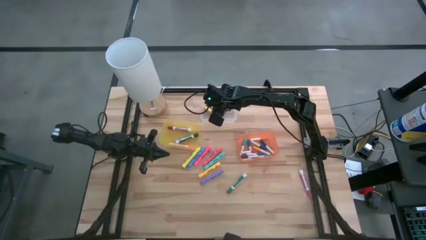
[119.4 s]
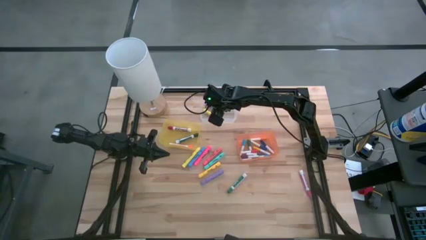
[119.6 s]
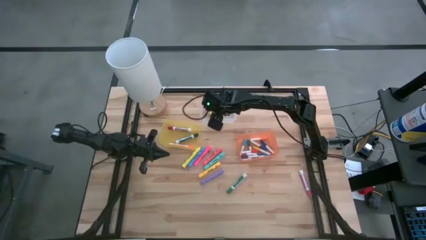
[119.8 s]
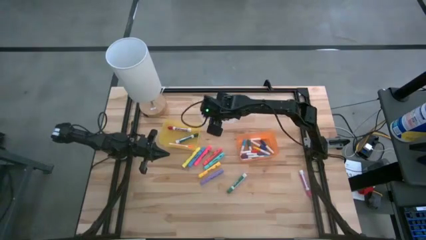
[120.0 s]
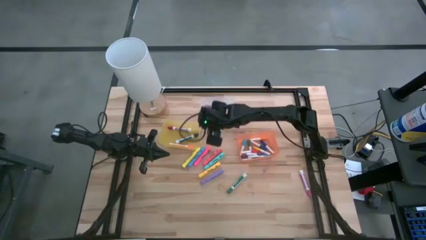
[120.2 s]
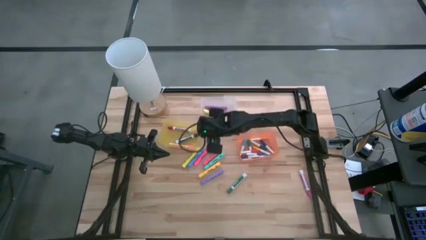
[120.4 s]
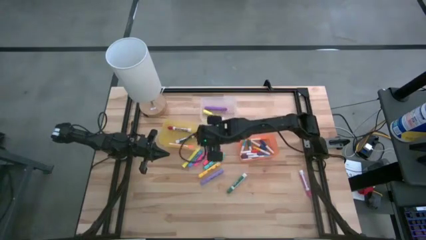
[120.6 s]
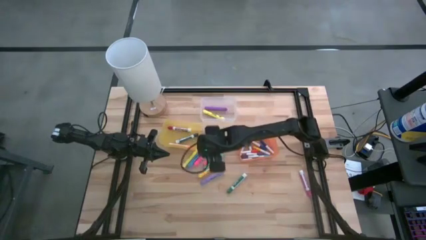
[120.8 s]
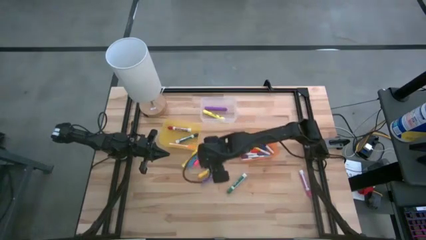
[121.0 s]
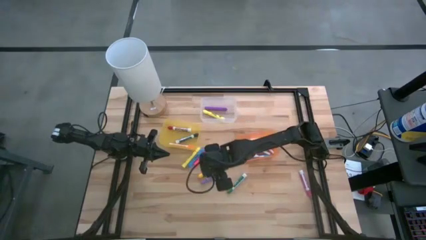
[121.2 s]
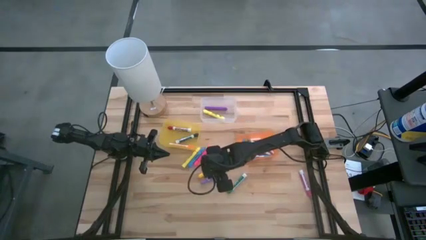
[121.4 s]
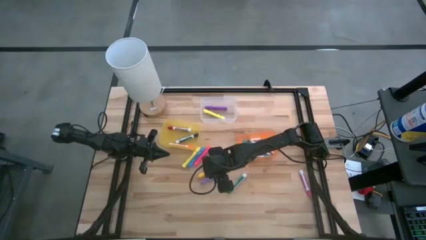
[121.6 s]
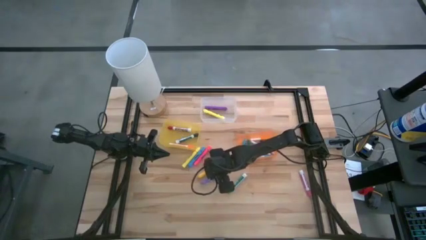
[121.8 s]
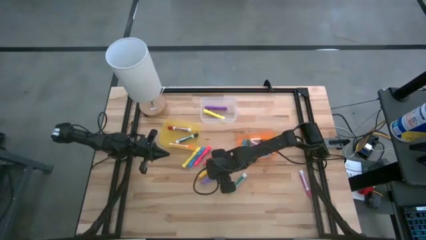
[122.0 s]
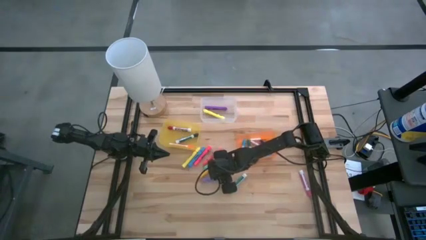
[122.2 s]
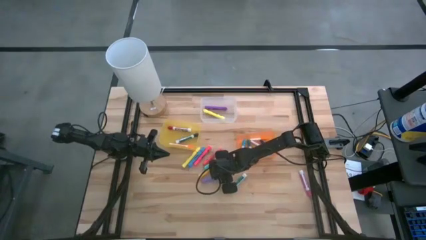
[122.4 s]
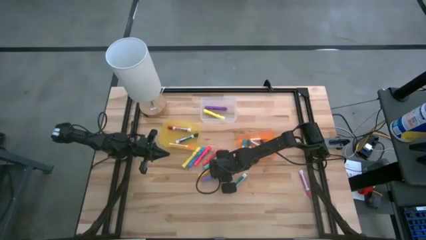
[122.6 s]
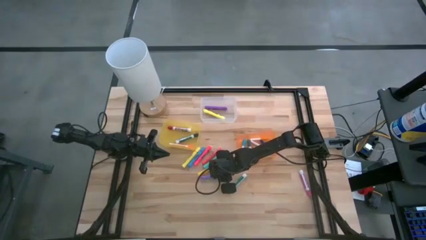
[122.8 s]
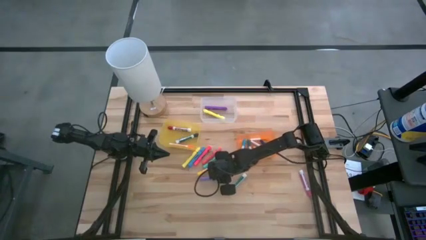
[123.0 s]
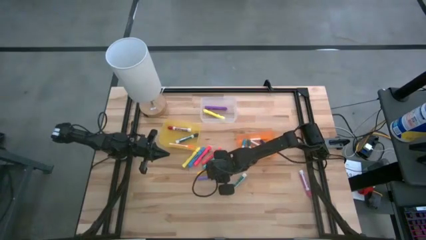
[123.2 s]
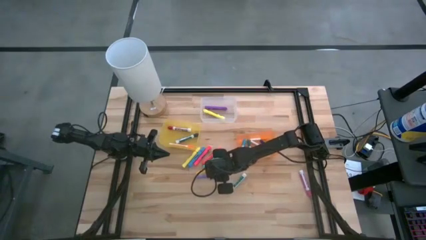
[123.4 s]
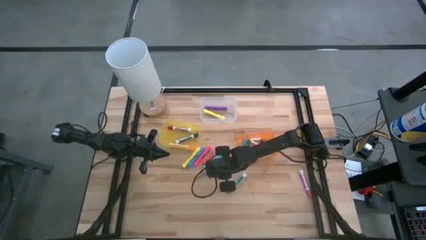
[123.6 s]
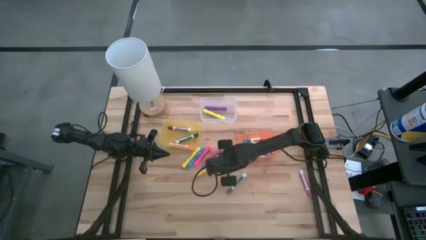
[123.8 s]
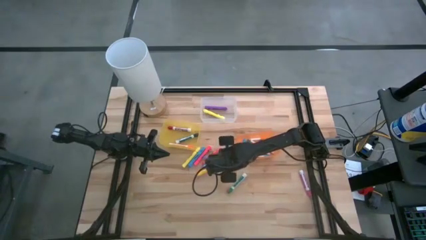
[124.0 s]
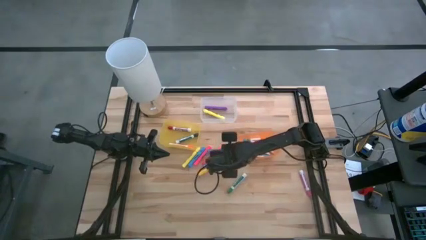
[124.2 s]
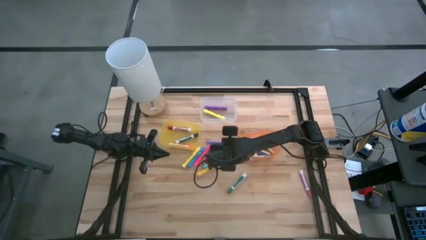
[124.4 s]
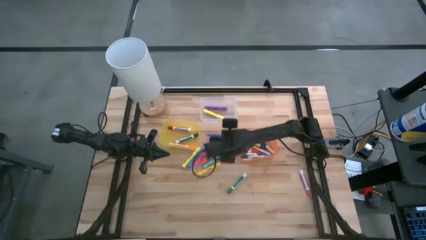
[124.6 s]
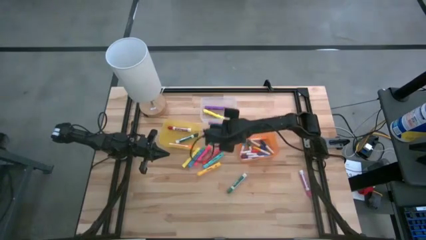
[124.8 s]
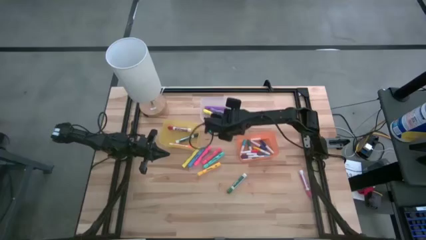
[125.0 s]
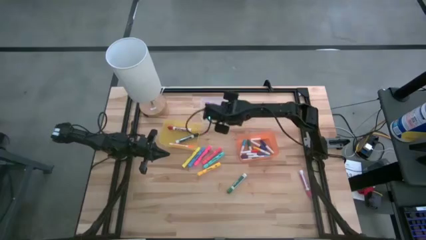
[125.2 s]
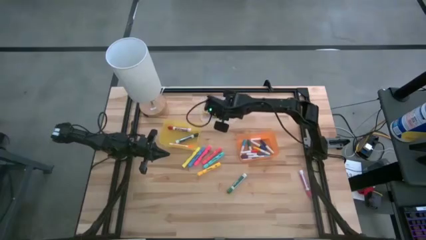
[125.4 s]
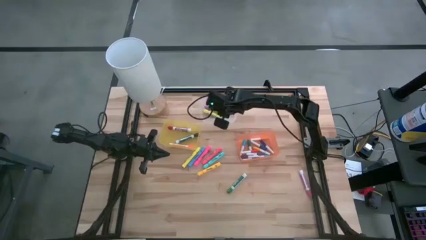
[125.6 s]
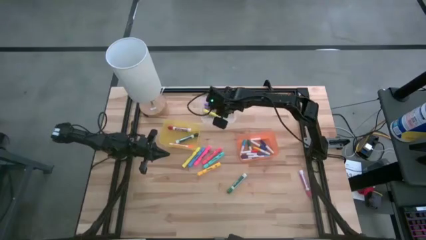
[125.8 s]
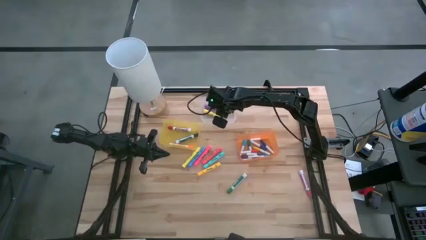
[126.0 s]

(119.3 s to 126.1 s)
Task: Pick & Place Markers
Put the large violet highlighter pen into the transparent bin

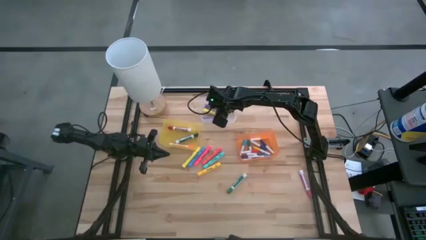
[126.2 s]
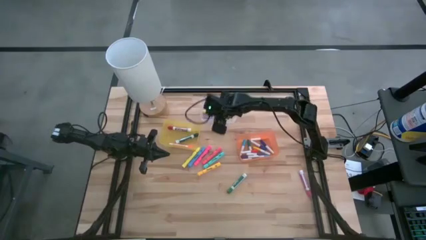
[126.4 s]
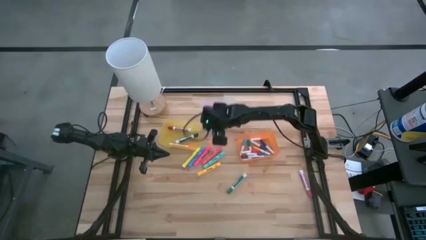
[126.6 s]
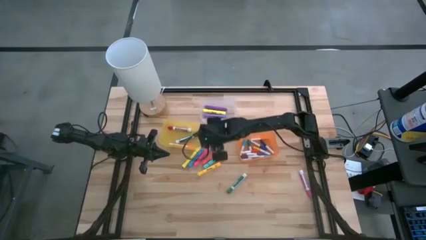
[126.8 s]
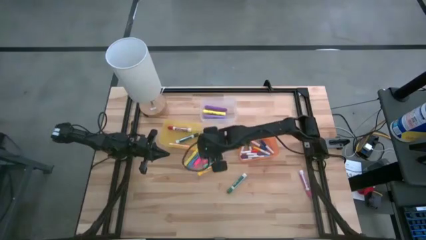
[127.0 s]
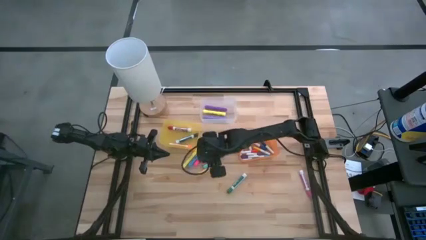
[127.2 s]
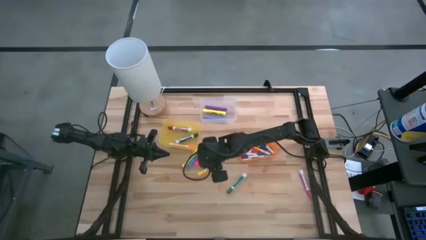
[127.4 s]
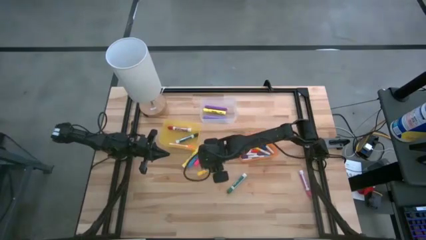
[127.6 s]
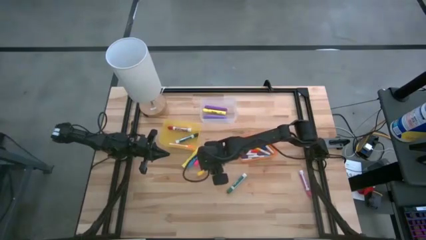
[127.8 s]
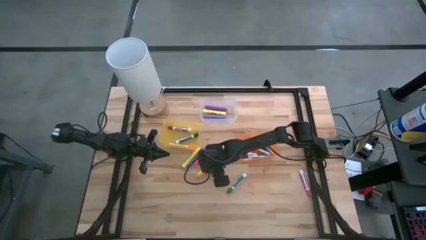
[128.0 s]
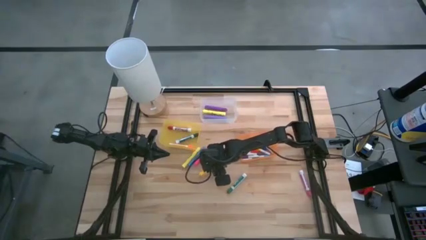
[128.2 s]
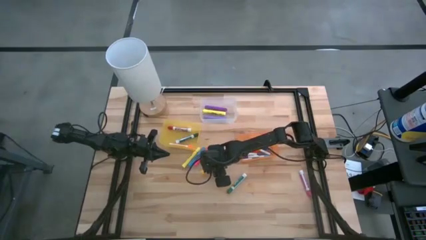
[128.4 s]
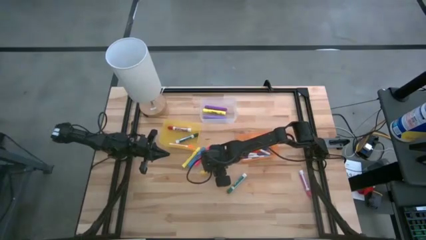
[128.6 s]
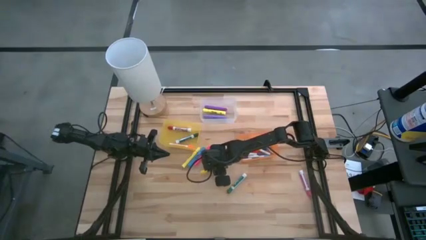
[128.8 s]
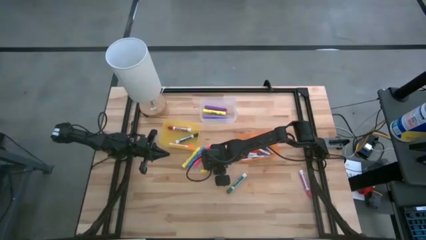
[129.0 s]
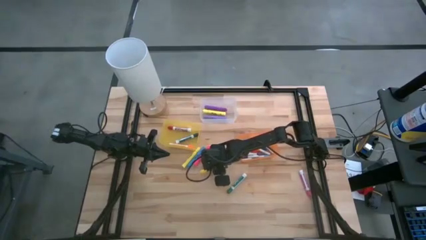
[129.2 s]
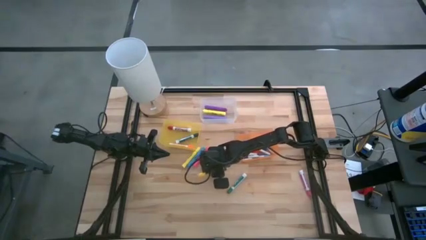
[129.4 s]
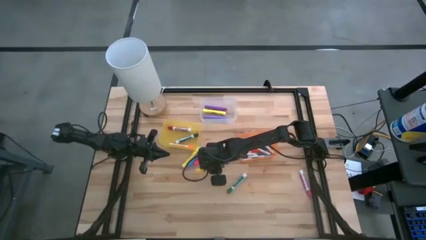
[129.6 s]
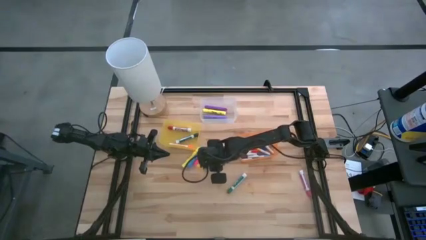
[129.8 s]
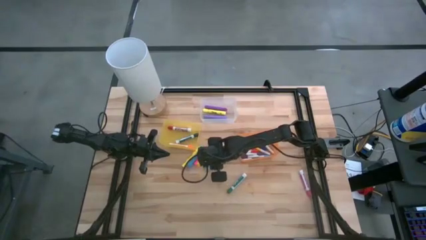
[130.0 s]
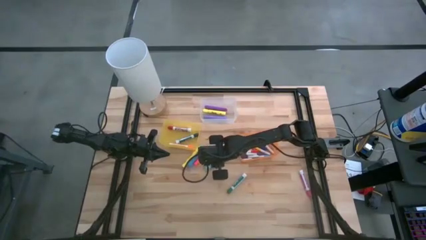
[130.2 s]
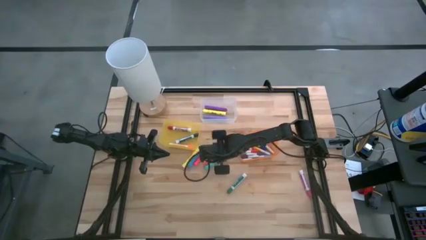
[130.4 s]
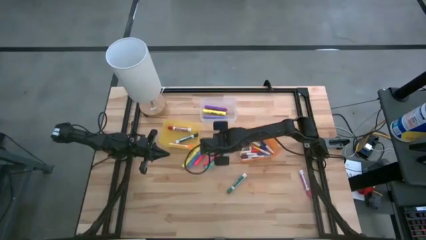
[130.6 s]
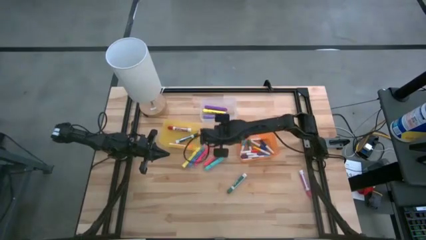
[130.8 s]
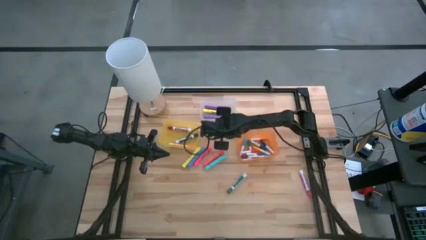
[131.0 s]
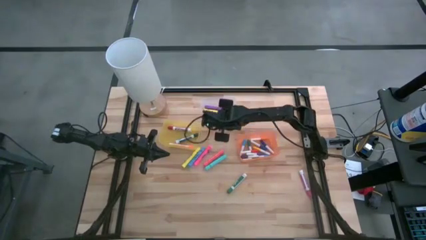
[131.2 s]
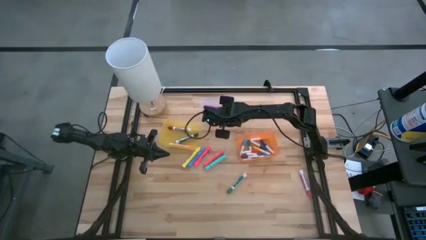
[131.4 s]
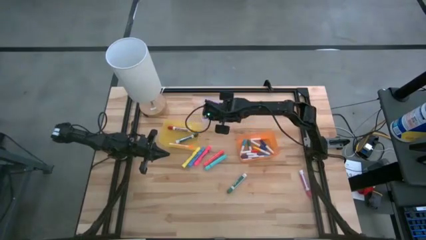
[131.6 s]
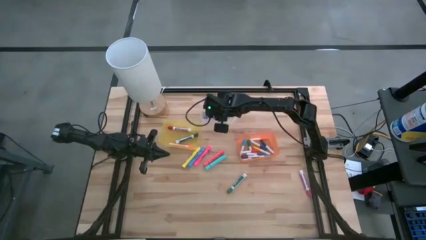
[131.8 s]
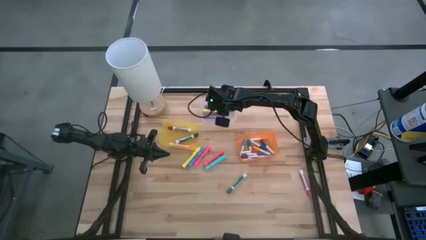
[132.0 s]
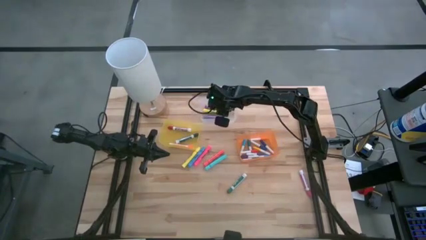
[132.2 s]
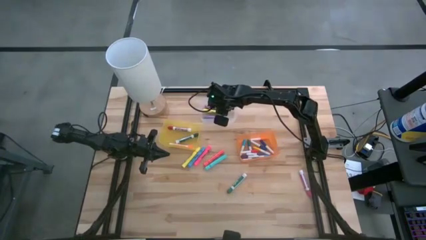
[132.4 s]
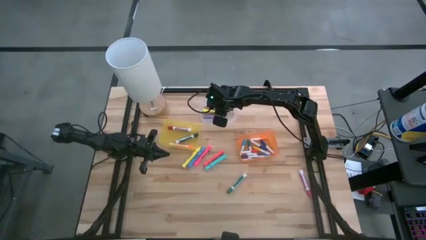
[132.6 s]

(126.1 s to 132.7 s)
Put the large light orange highlighter pen into the transparent bin
